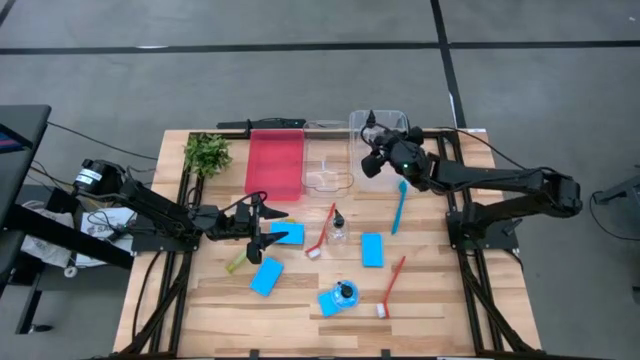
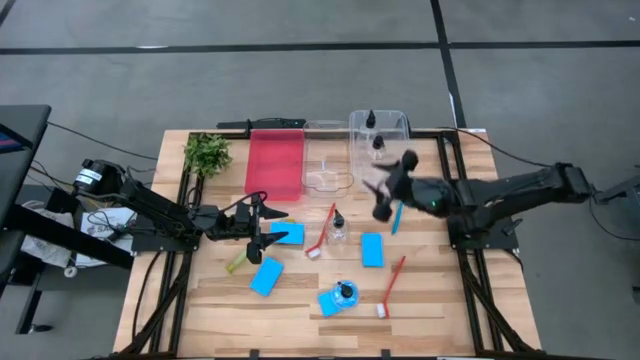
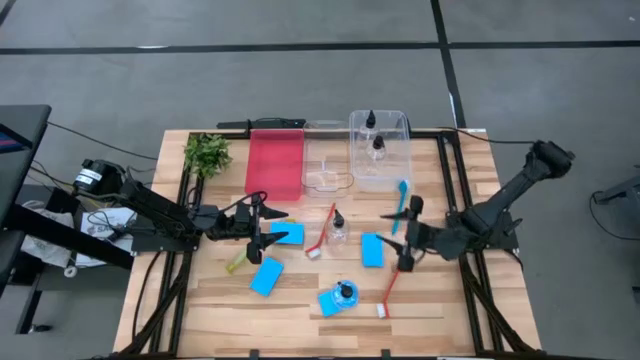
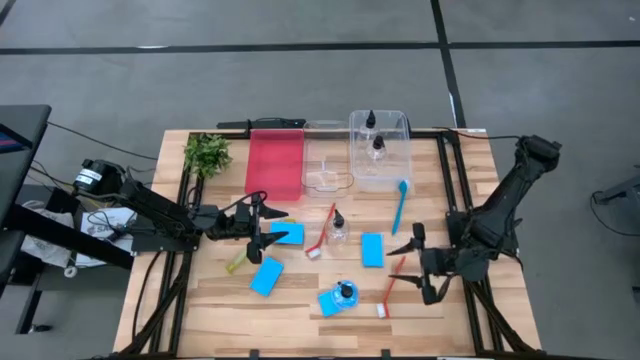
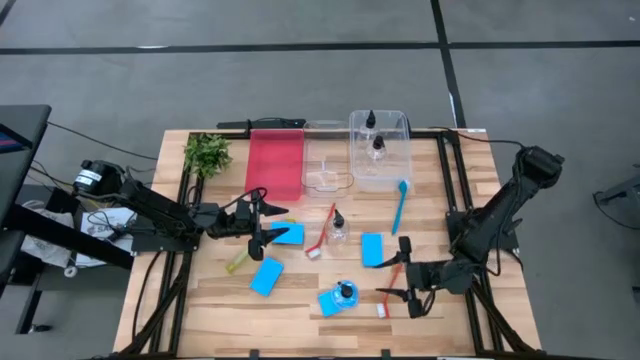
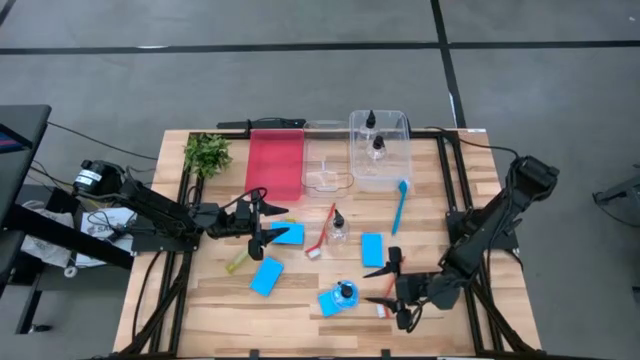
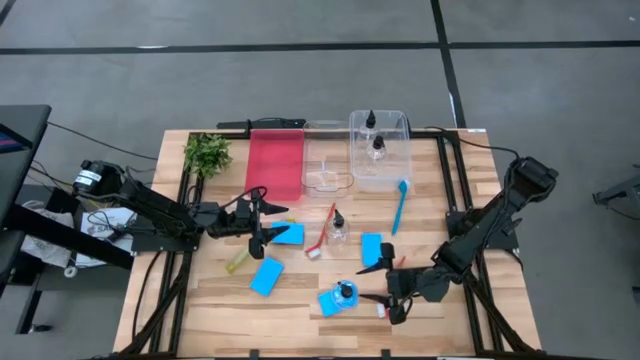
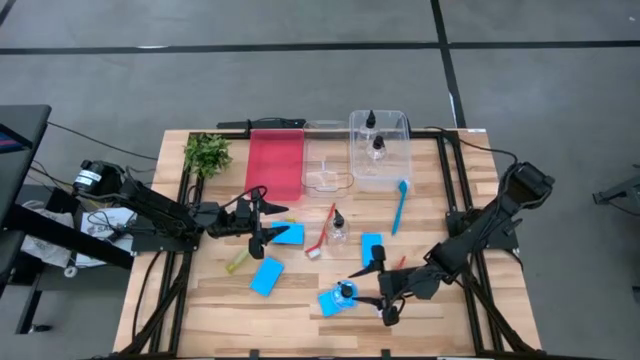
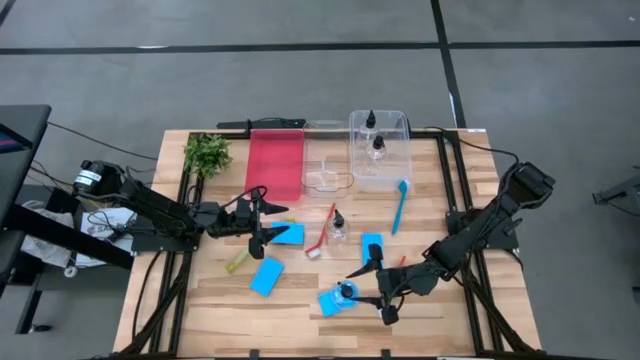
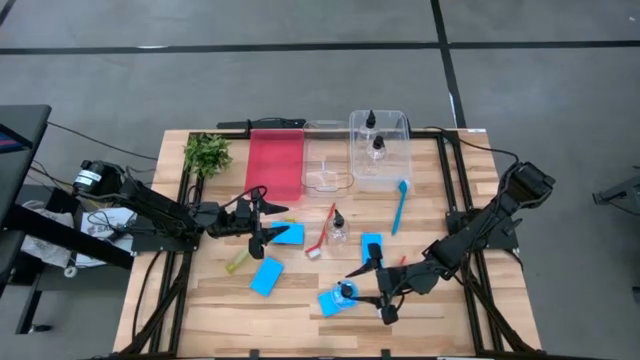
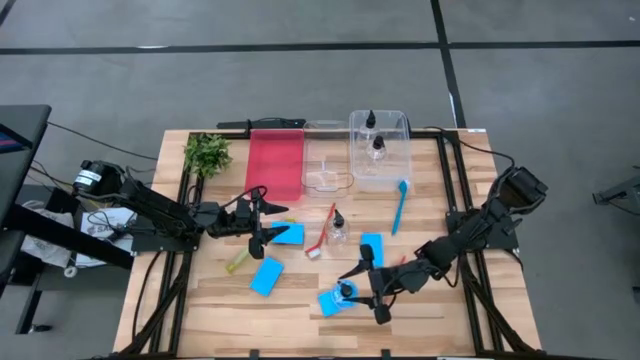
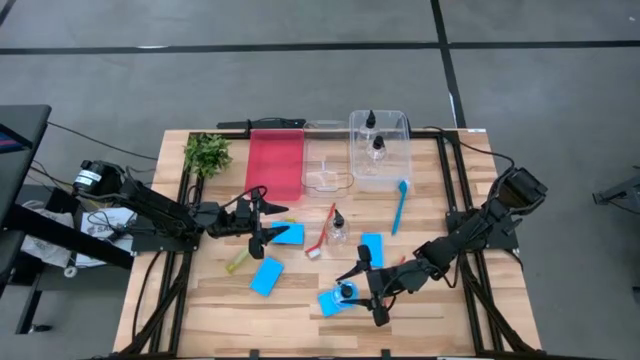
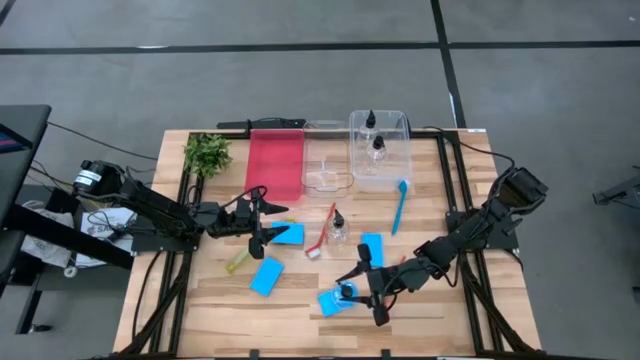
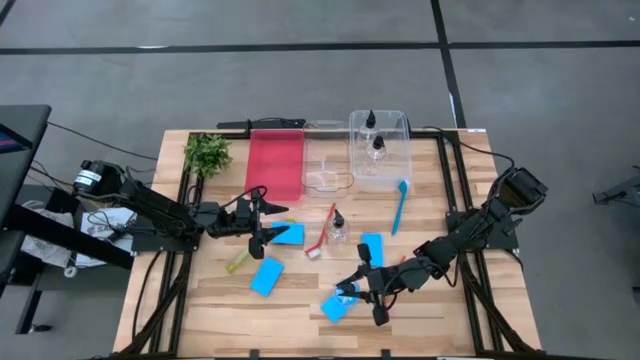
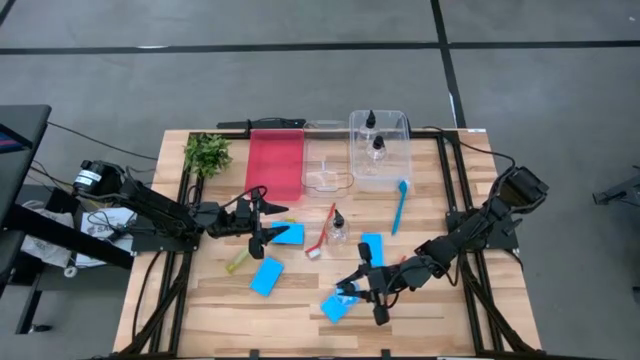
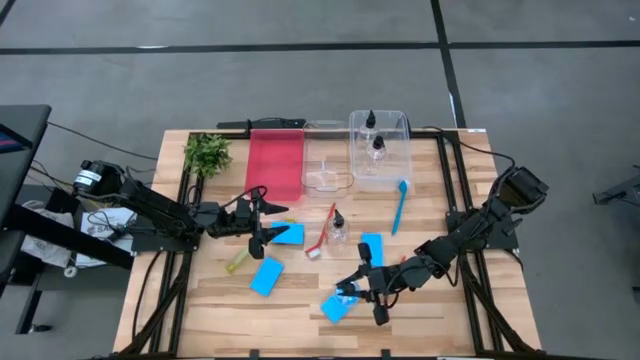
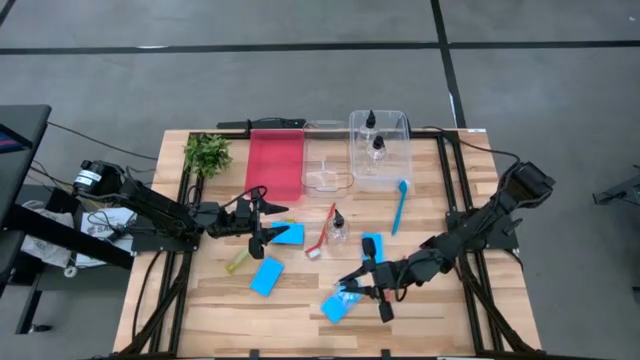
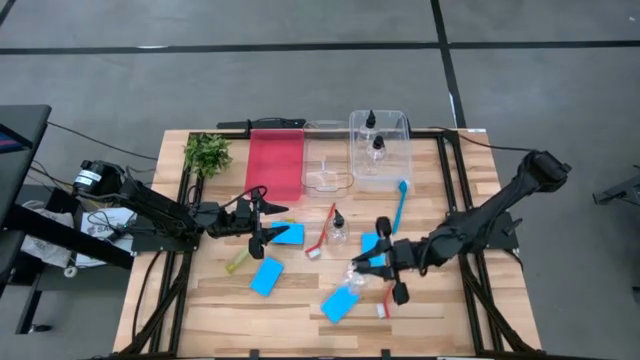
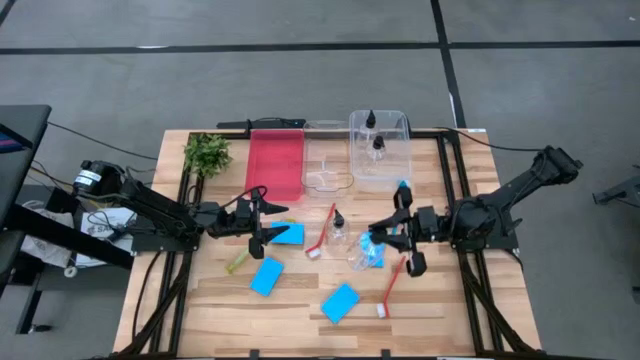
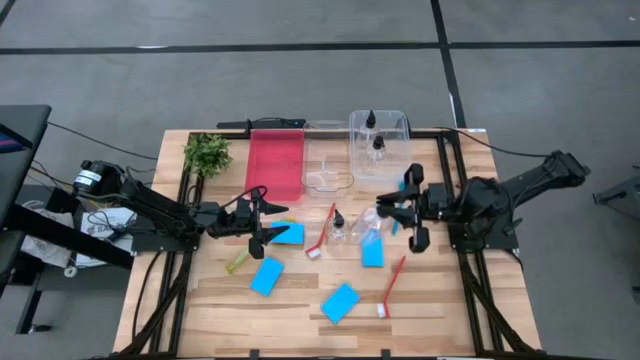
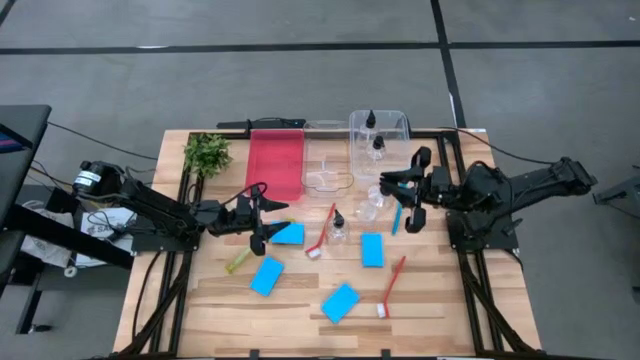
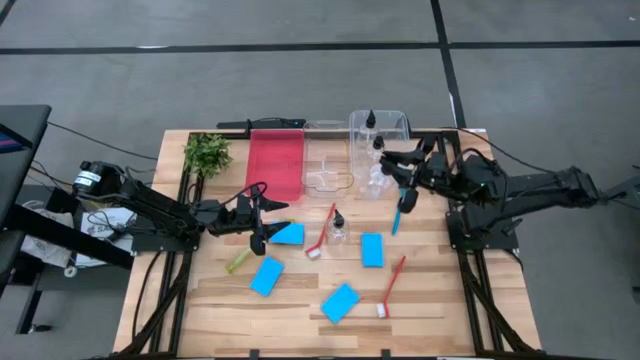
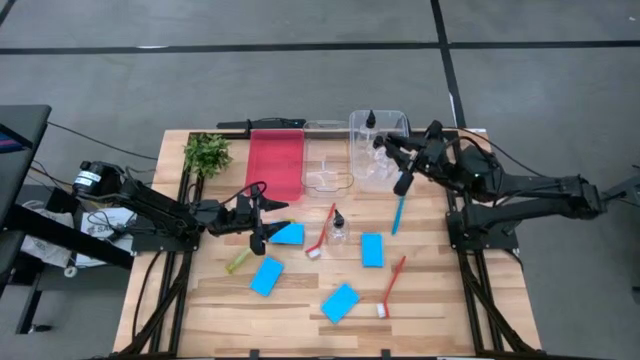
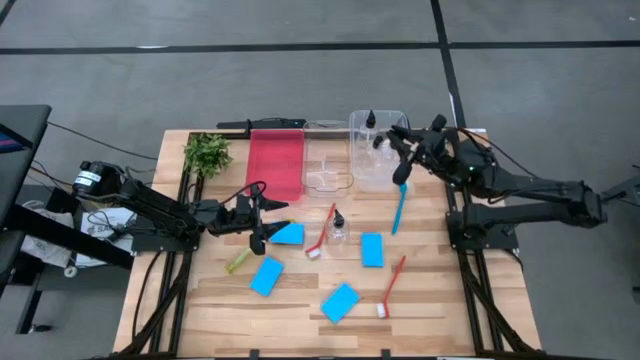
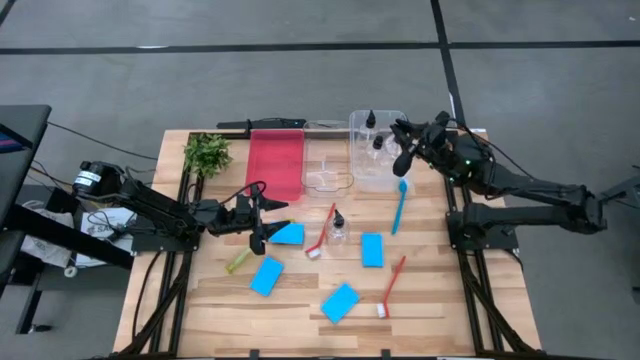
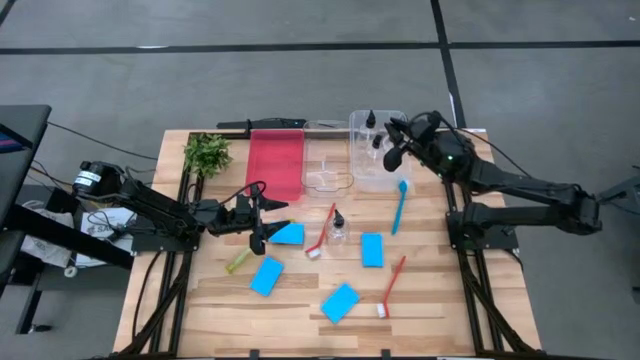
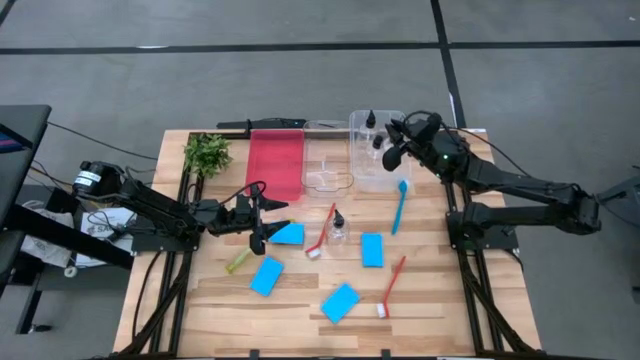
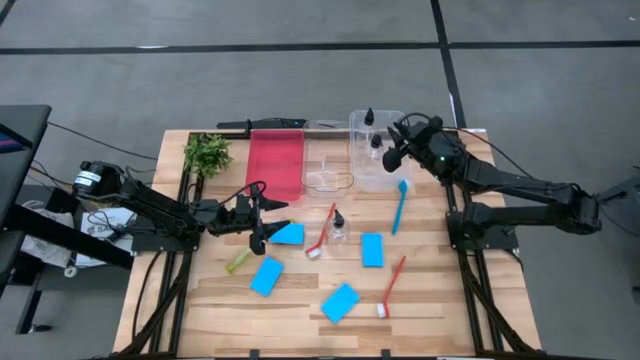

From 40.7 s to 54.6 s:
Task: Pick & Place Kitchen Sink Supplies
Put the bottom soap dispenser into the right transparent bin

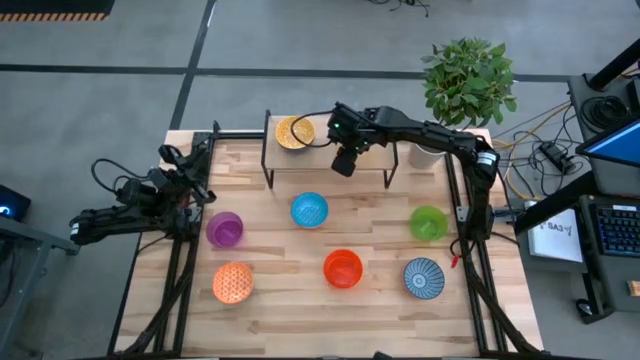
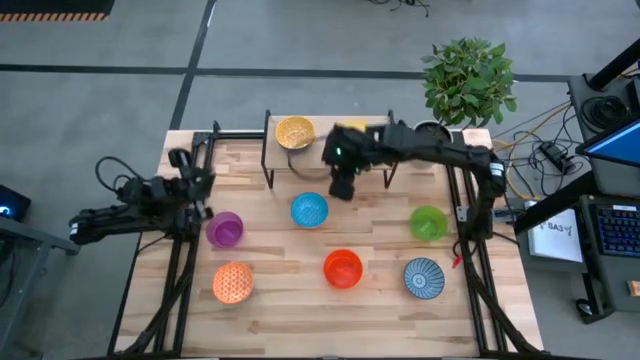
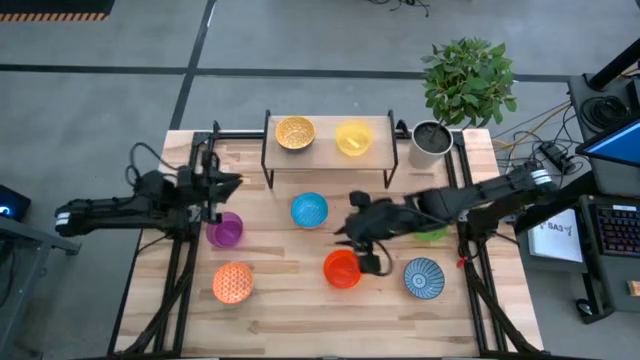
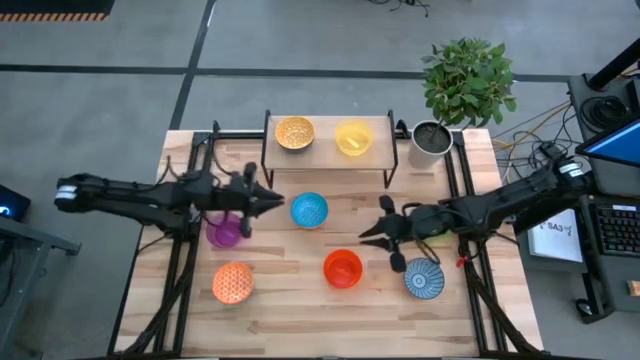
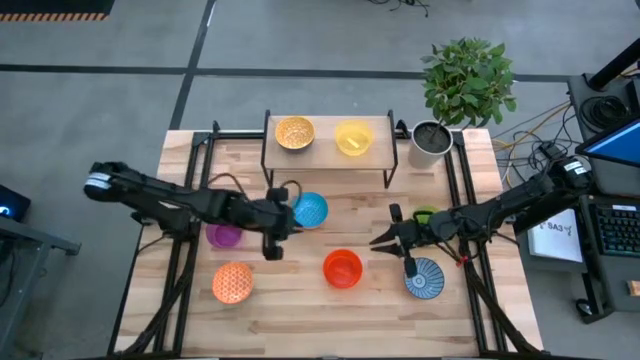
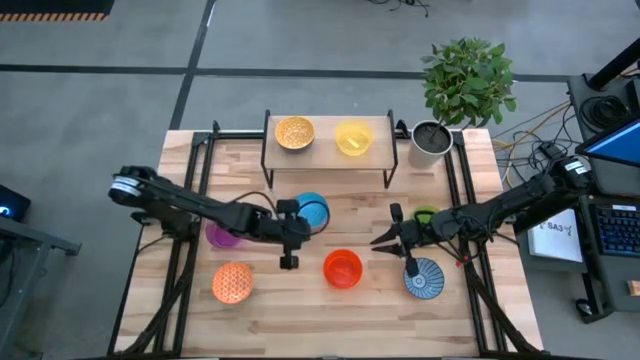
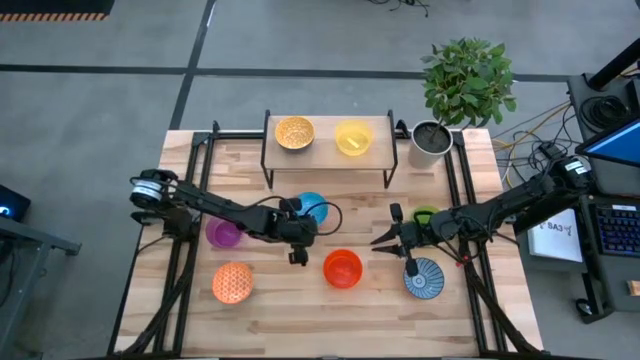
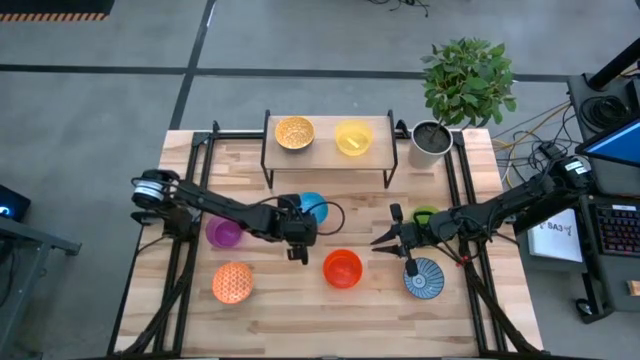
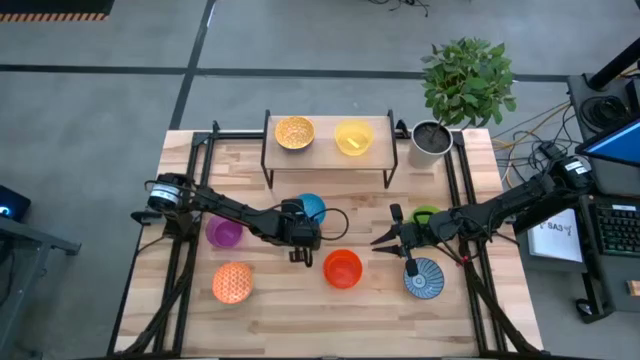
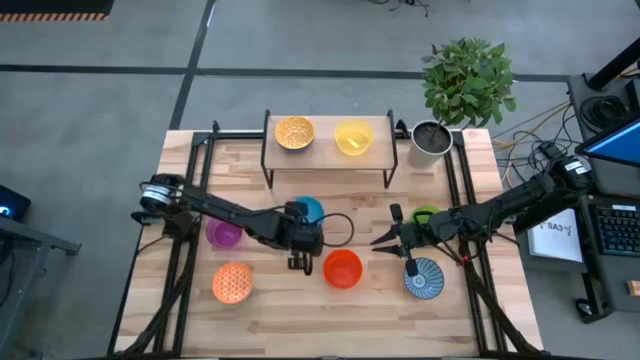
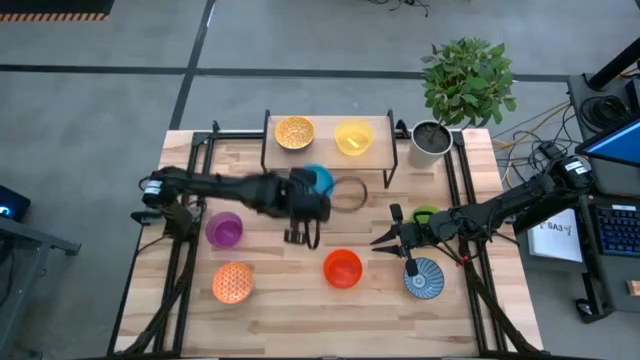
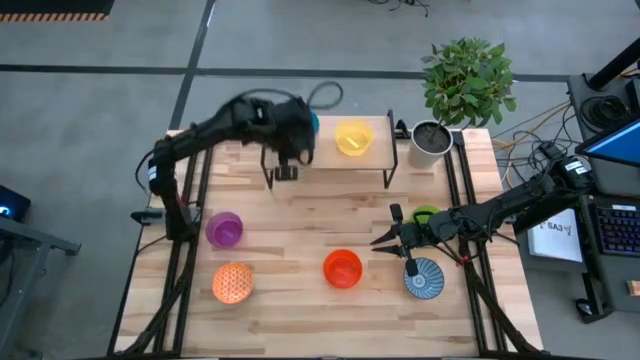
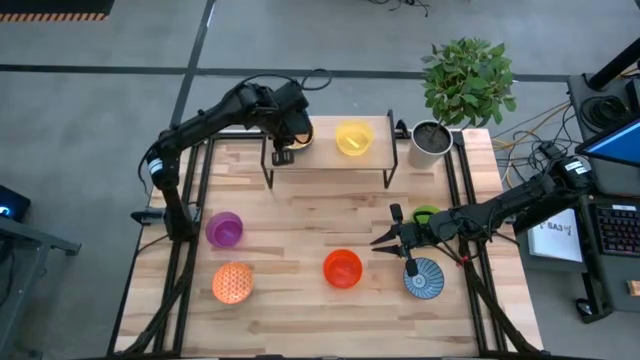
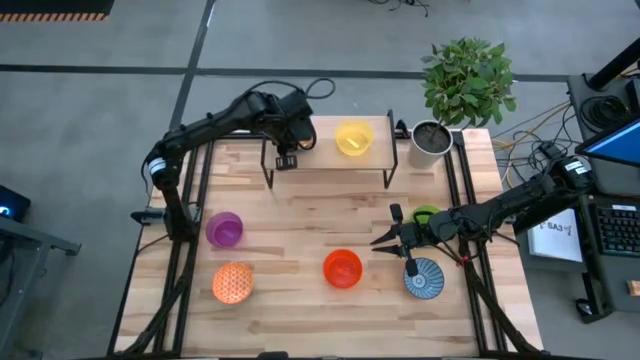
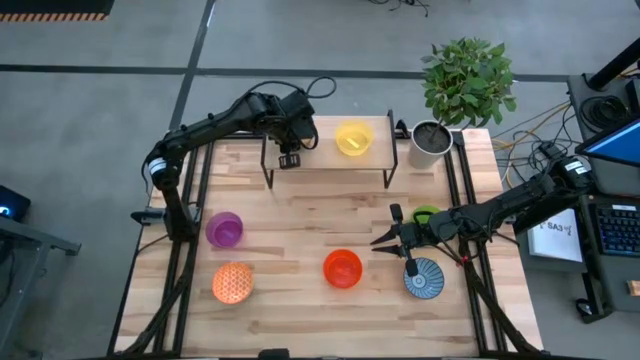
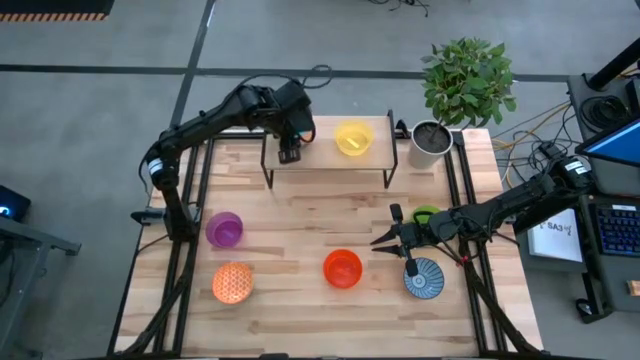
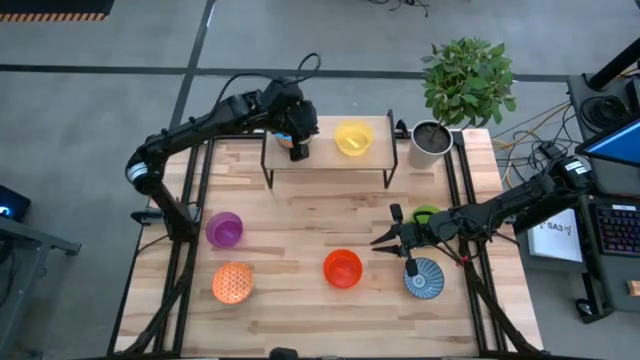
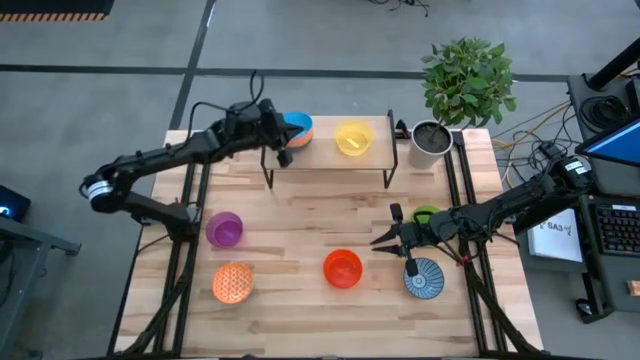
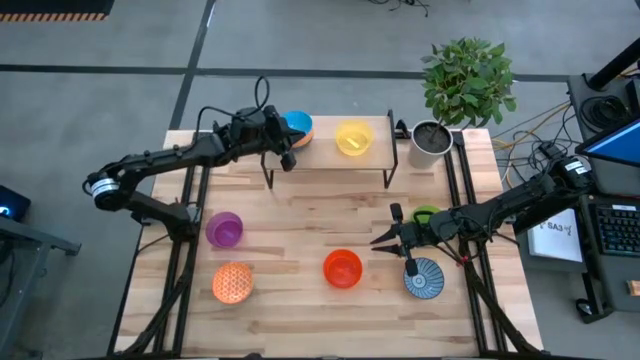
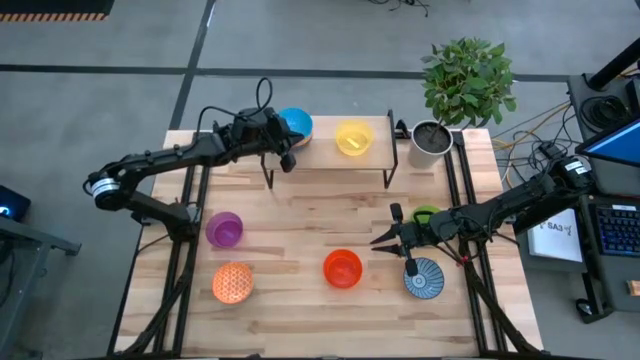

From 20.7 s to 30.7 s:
Task: Place and stack bowls onto a shelf
Stack the patterned light blue bowl on top of the yellow bowl on the shelf
